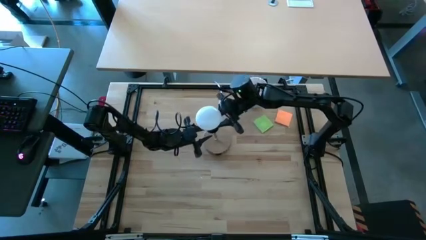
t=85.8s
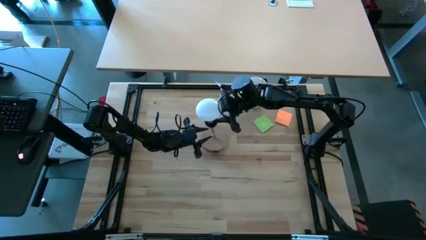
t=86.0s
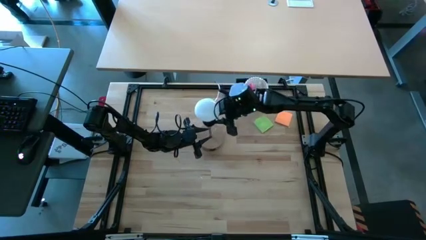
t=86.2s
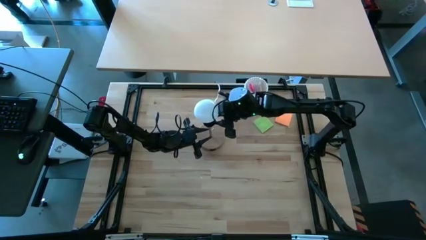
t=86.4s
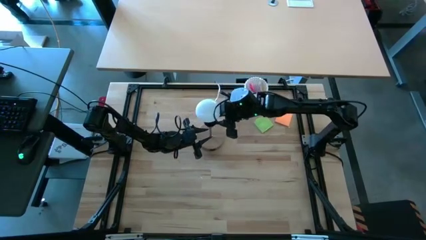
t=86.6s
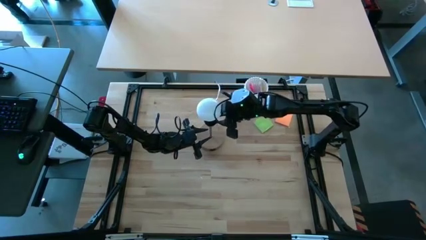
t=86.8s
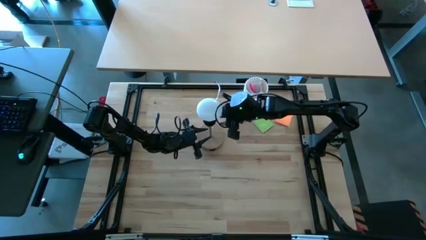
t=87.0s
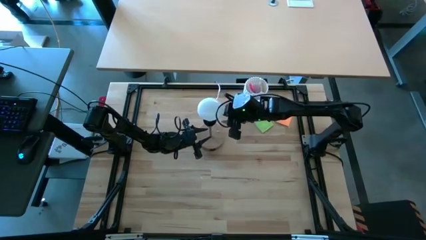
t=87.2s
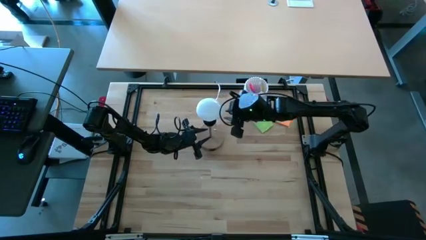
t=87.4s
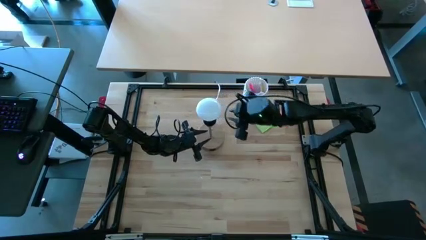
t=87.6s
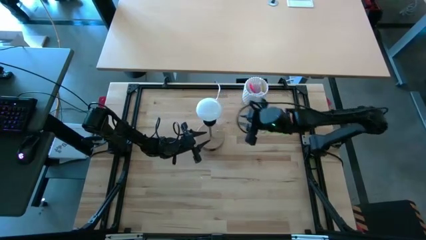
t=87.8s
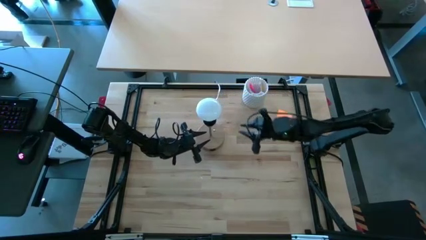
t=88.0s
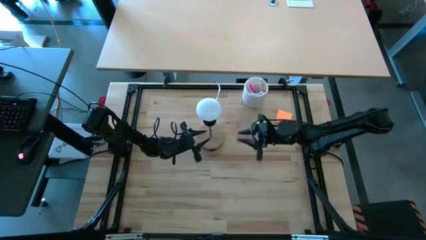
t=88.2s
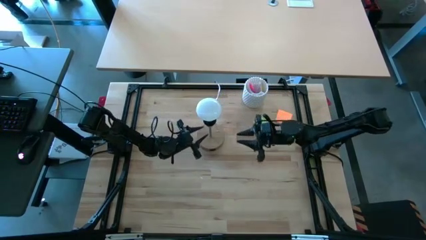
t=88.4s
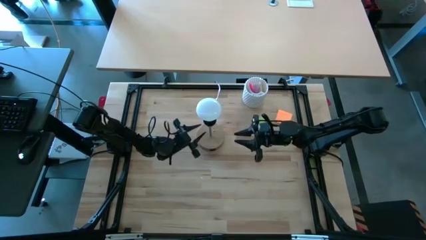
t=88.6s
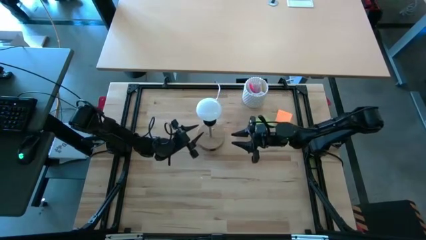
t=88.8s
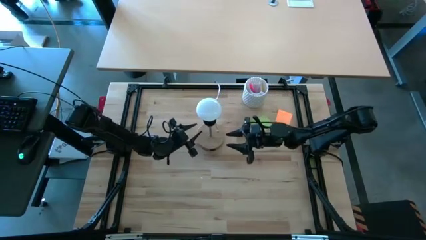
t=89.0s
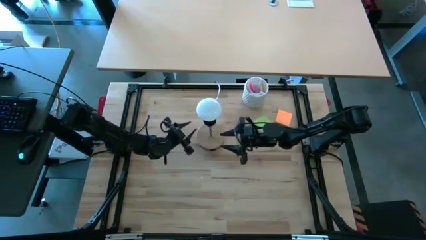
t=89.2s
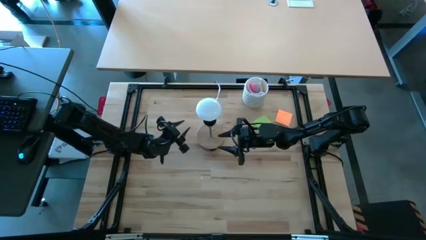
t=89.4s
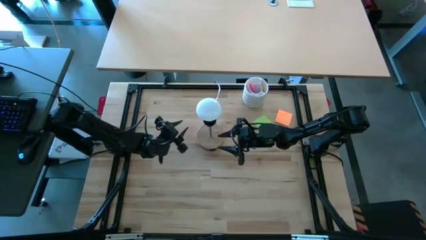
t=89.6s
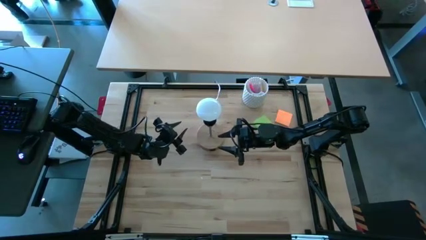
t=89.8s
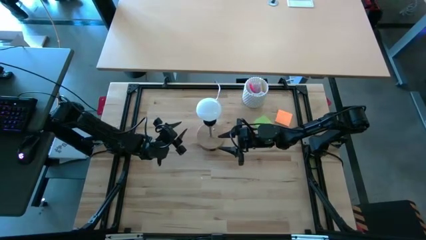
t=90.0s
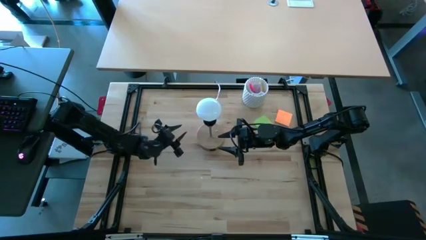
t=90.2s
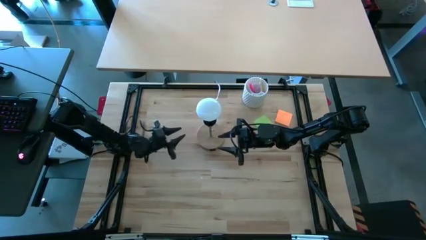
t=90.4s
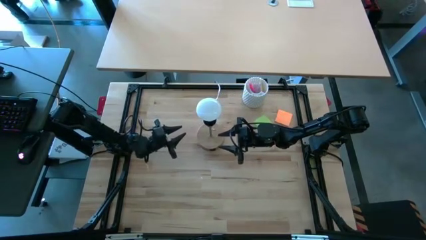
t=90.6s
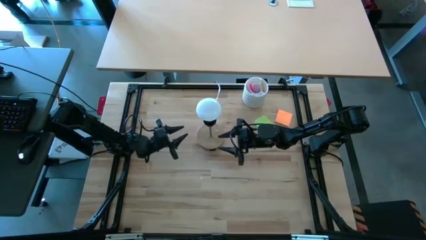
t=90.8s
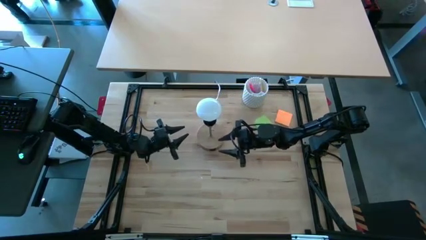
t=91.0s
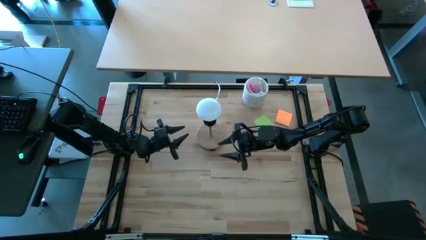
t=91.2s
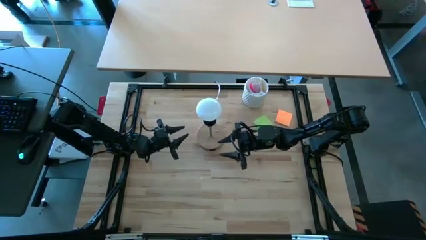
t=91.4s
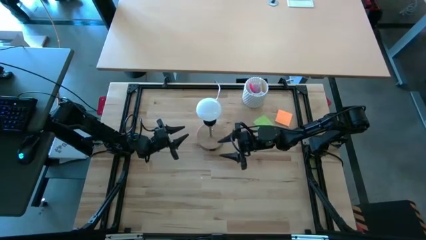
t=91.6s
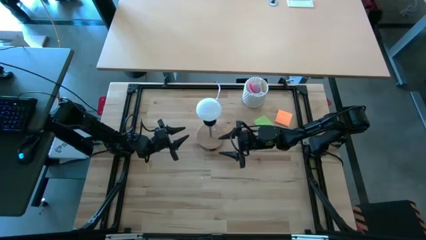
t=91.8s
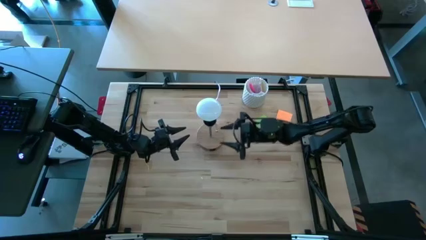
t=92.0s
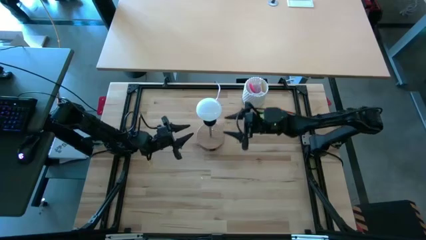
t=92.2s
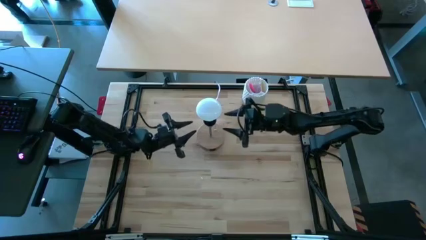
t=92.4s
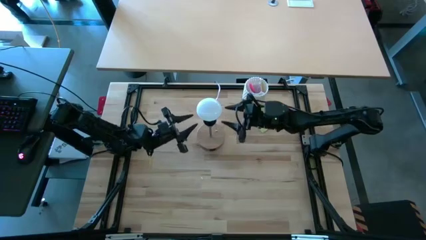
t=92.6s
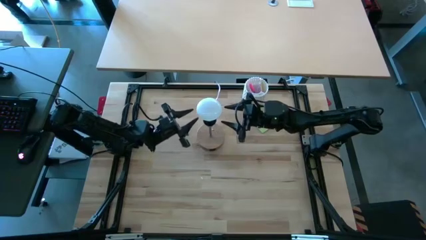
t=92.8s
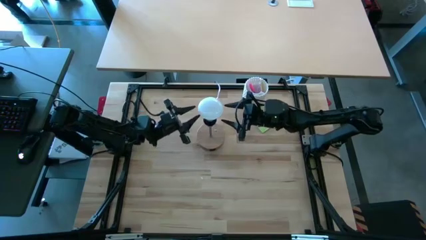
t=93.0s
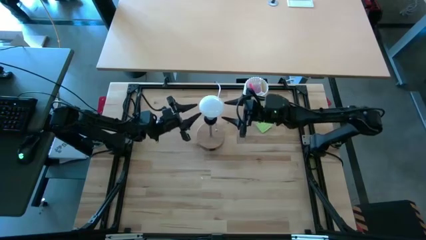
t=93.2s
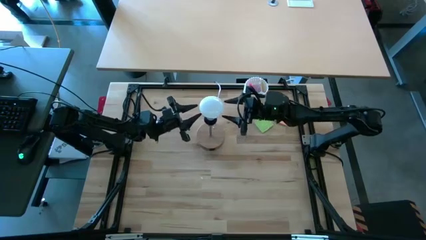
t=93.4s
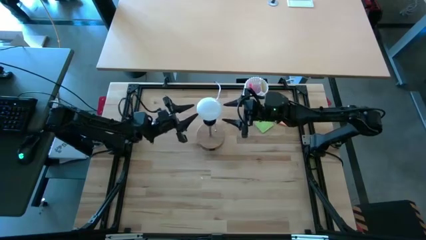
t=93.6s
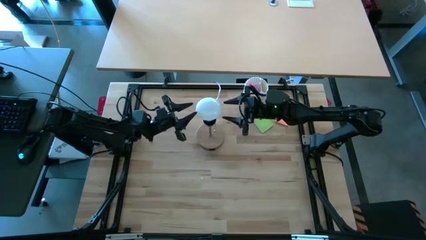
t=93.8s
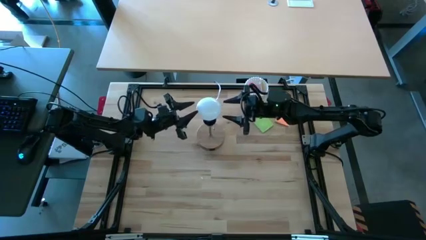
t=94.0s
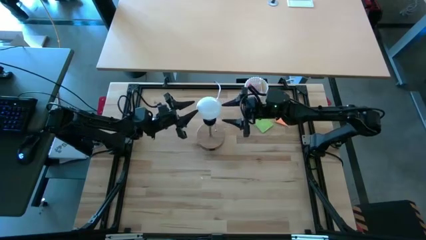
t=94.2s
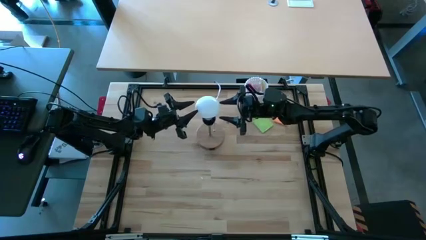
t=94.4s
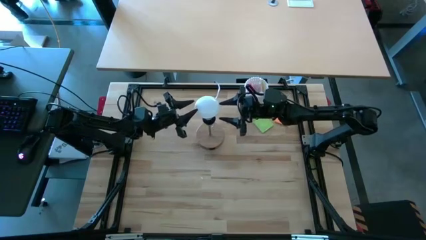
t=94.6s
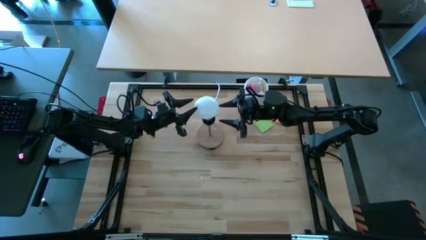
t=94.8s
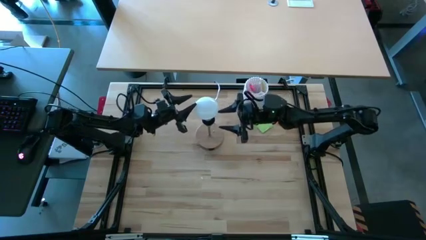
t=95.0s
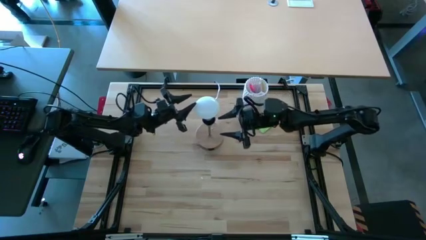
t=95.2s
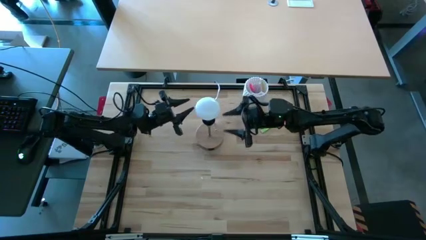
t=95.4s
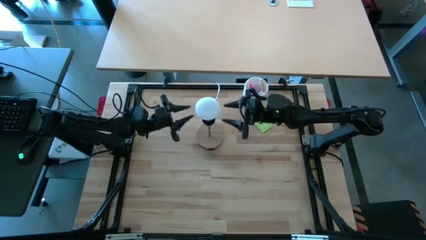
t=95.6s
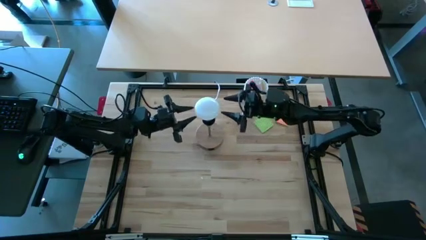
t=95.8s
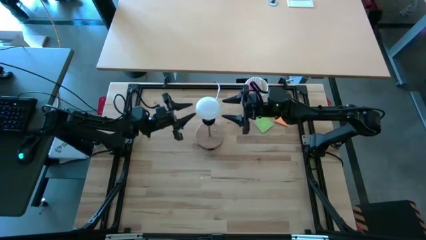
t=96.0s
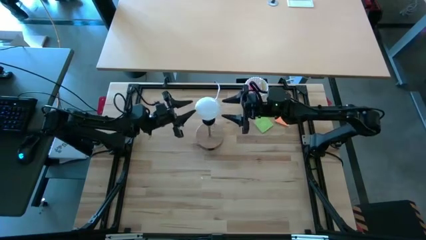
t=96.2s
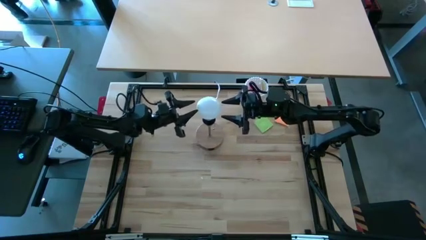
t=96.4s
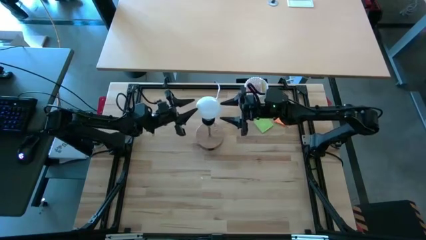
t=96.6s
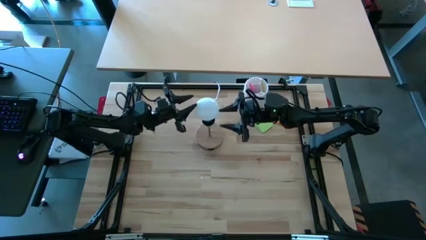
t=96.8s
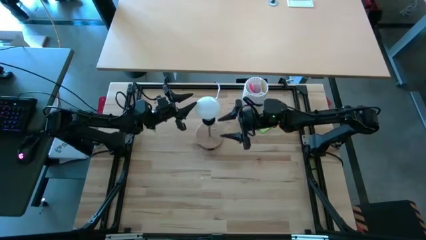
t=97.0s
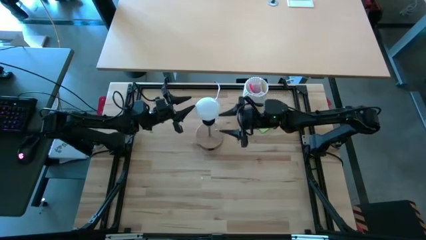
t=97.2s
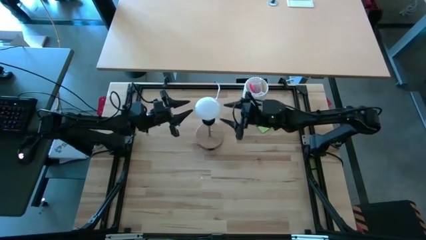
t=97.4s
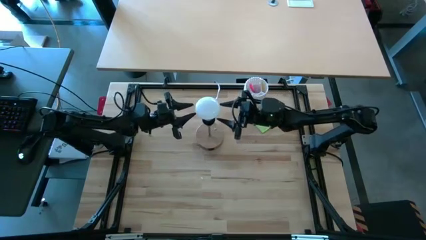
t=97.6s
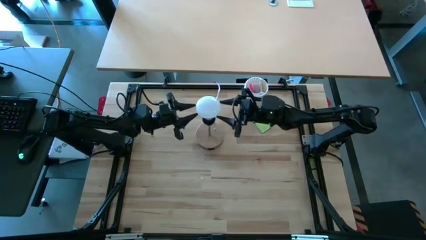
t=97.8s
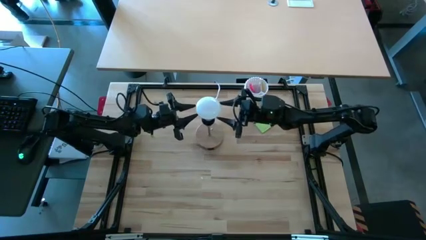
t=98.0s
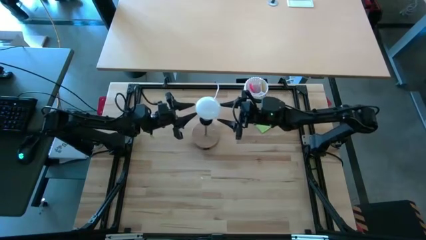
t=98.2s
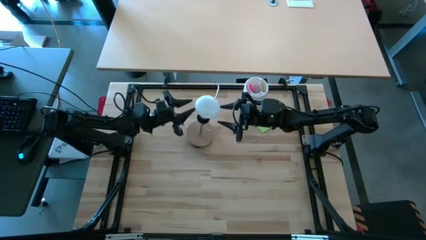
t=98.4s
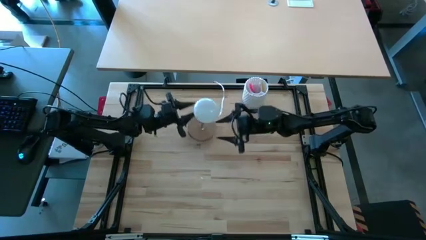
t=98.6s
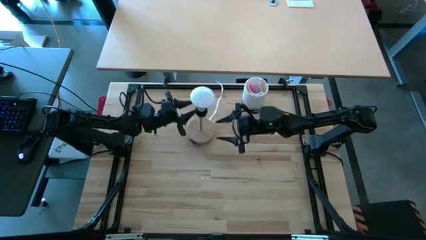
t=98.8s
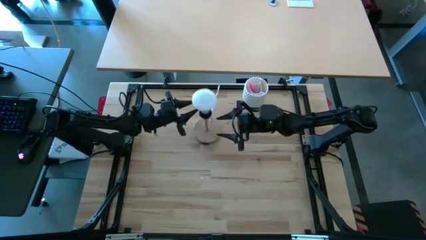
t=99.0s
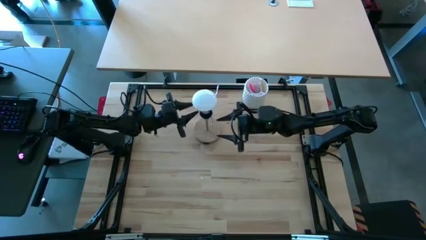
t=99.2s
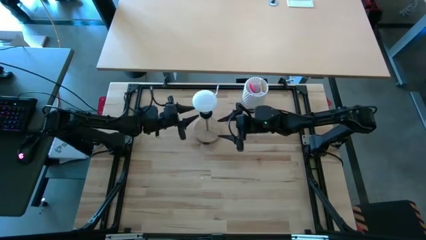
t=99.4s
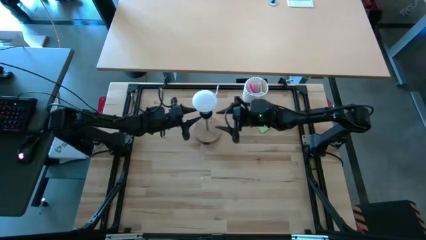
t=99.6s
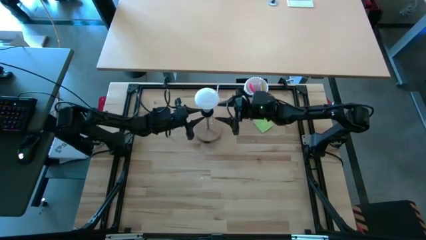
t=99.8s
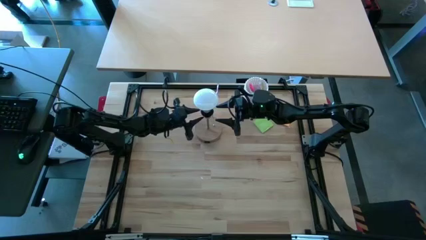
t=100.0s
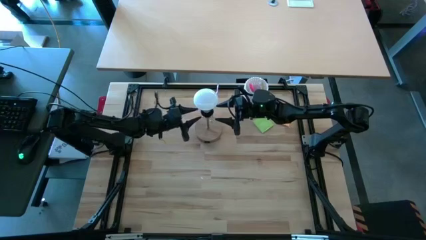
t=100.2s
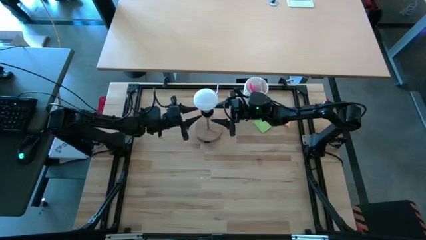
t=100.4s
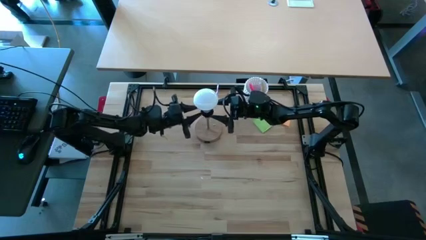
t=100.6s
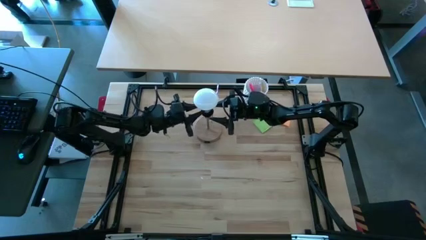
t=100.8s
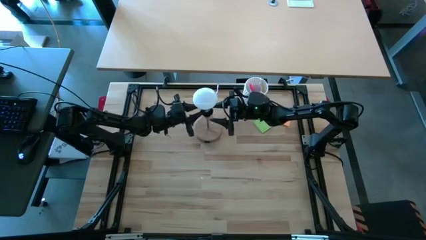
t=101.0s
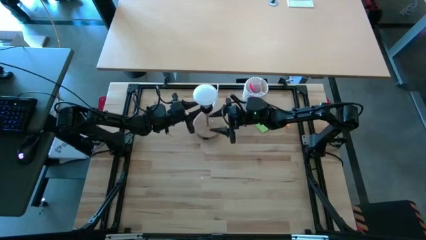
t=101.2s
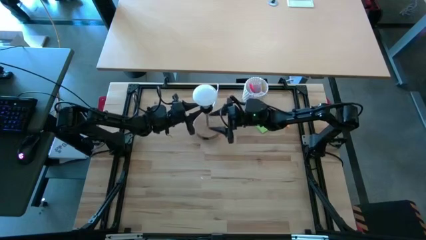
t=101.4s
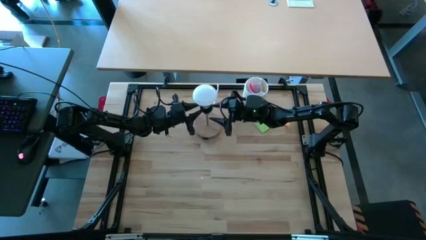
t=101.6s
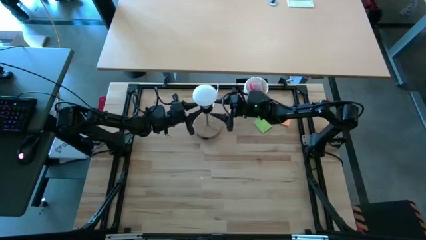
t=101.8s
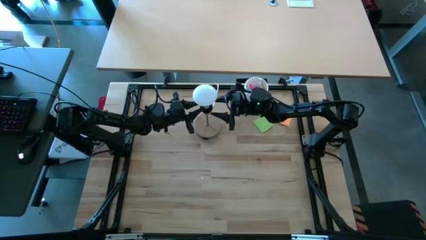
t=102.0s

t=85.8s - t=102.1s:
Task: Screw lightbulb
Insert the white lightbulb into the brown lamp
